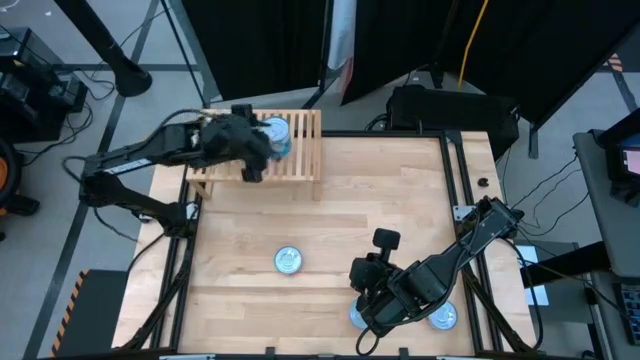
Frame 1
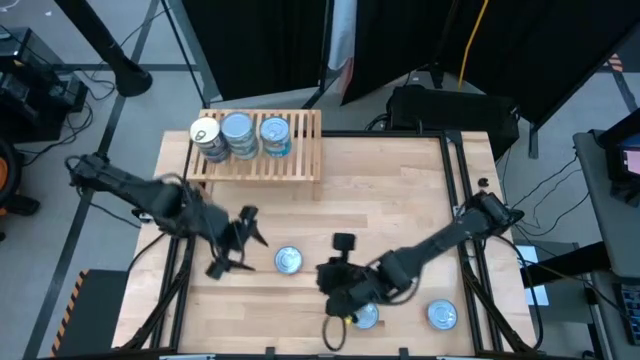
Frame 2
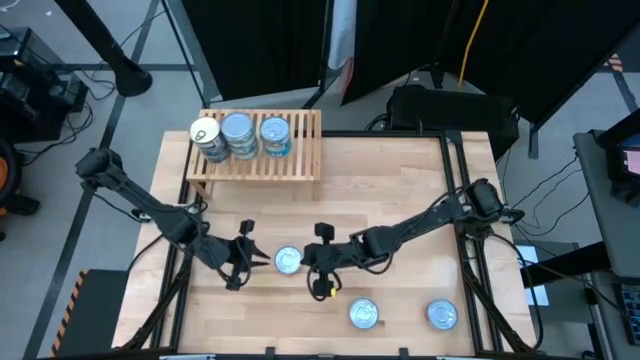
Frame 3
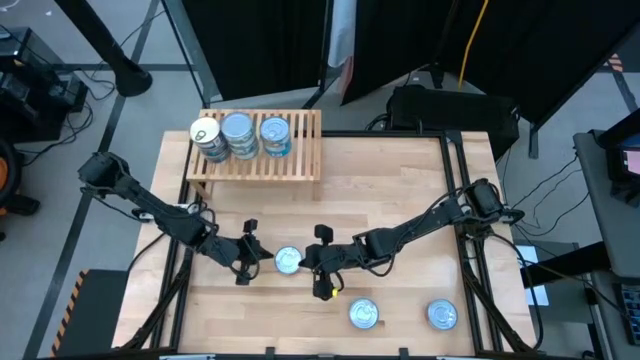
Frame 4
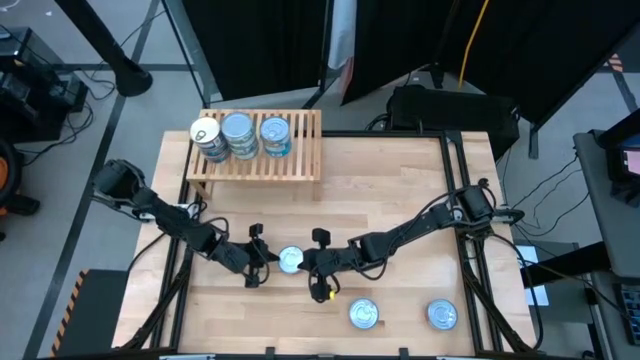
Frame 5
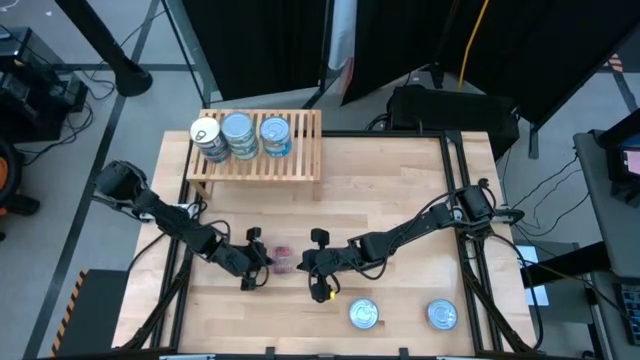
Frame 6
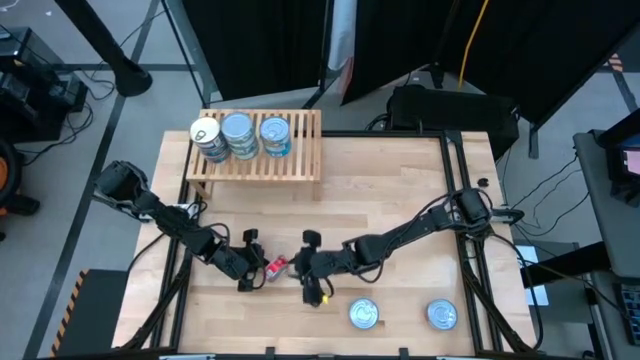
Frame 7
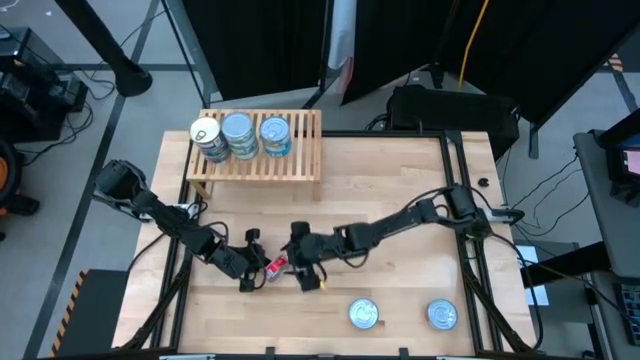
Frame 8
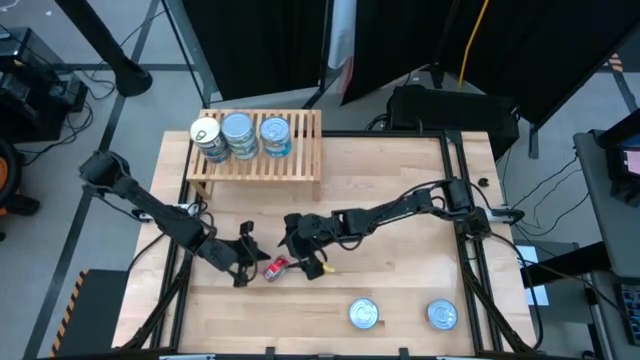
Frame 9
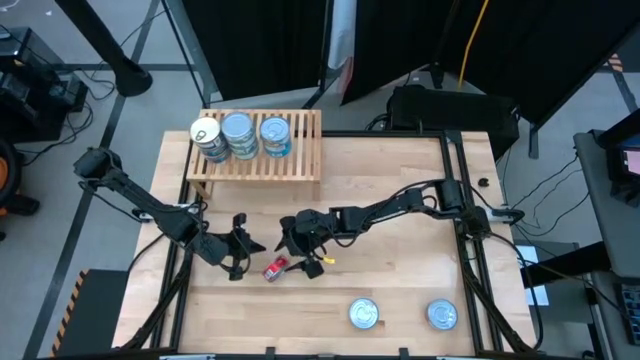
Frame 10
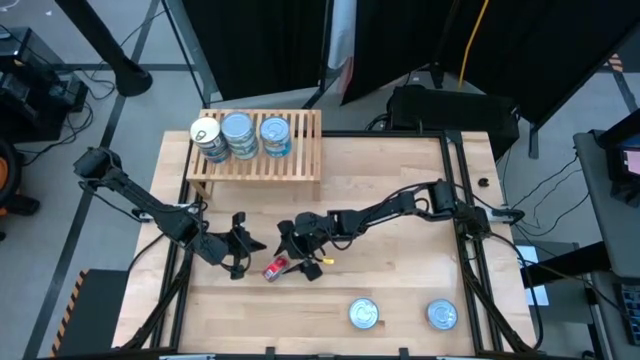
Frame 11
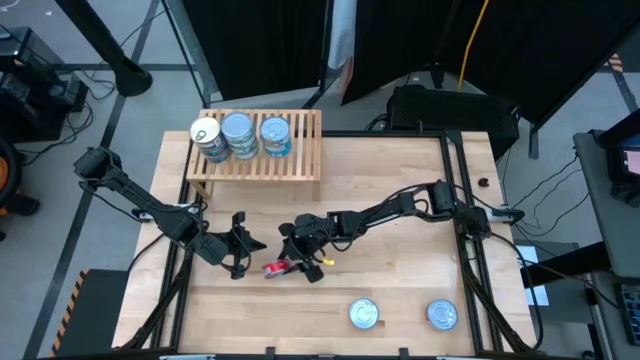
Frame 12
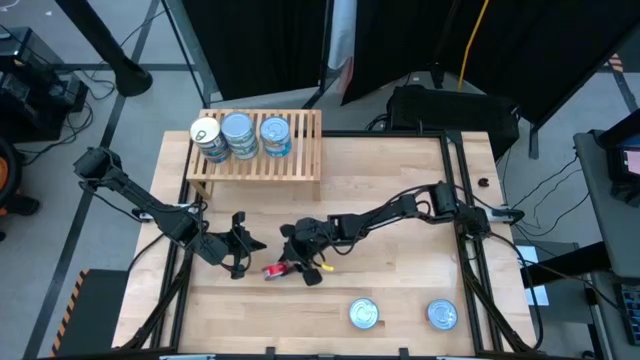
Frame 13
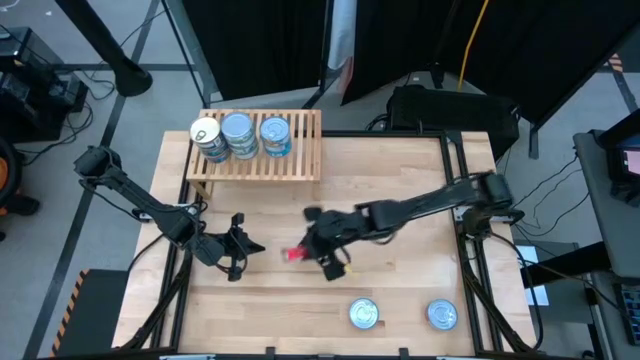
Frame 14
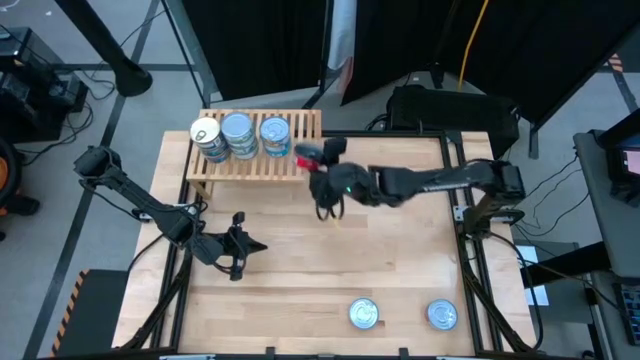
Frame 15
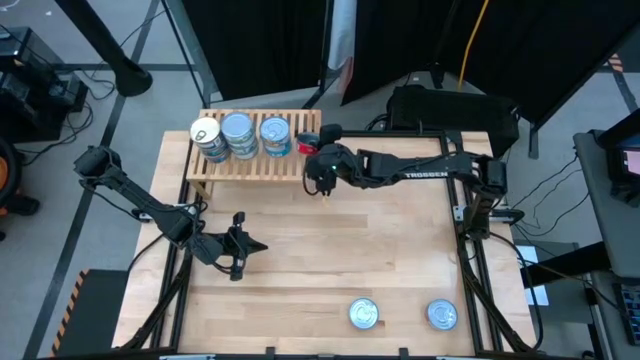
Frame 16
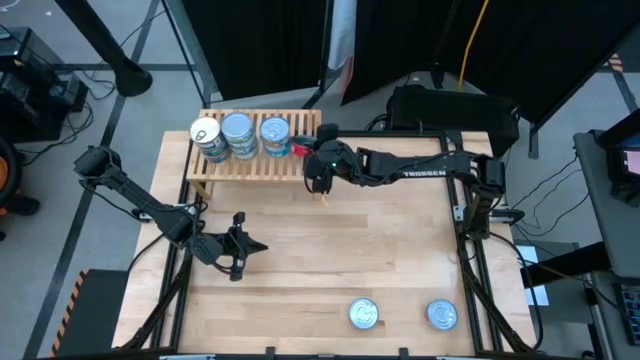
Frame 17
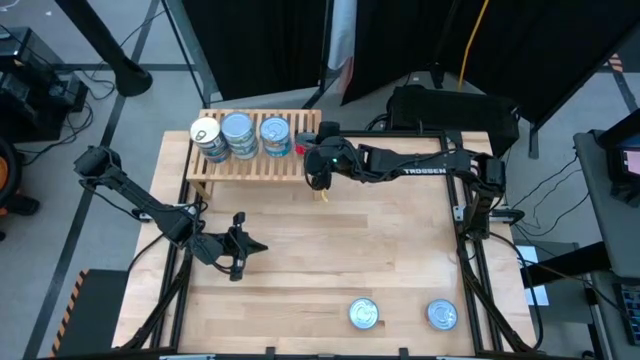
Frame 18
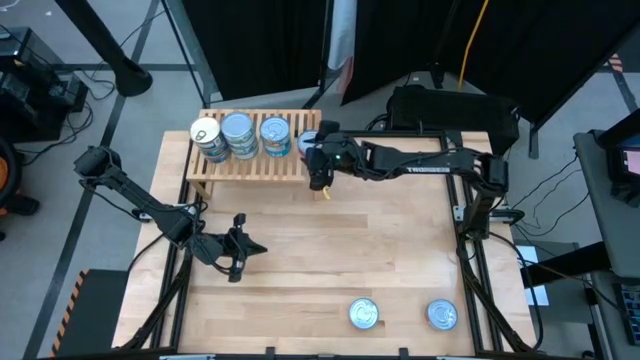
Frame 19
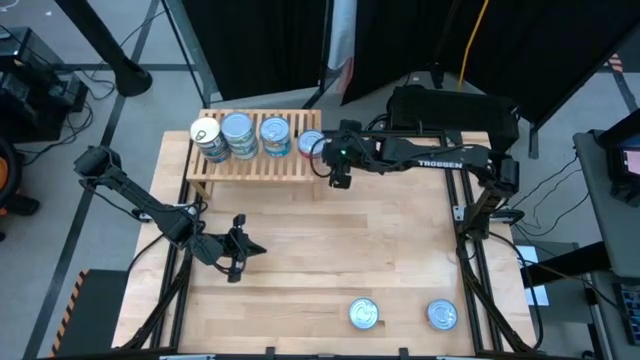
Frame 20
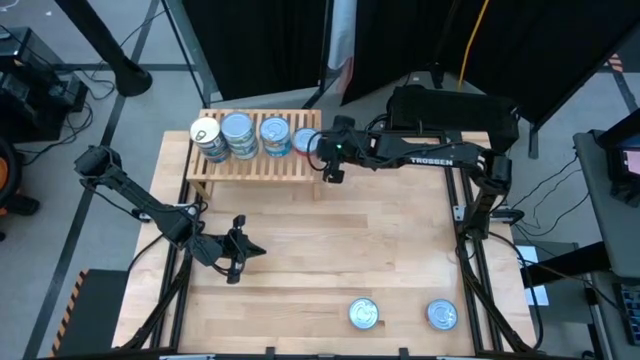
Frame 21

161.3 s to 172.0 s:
Task: Stack canned seafood by type on shelf
Put the top left red can on the shelf

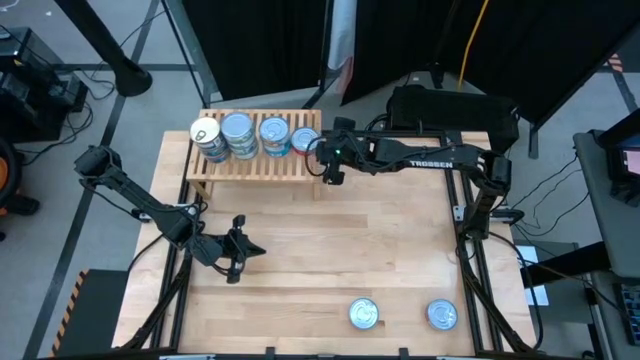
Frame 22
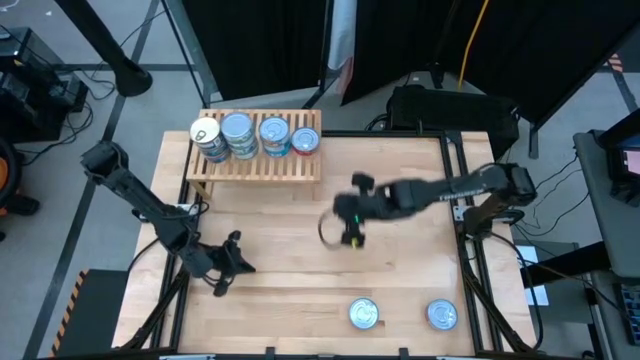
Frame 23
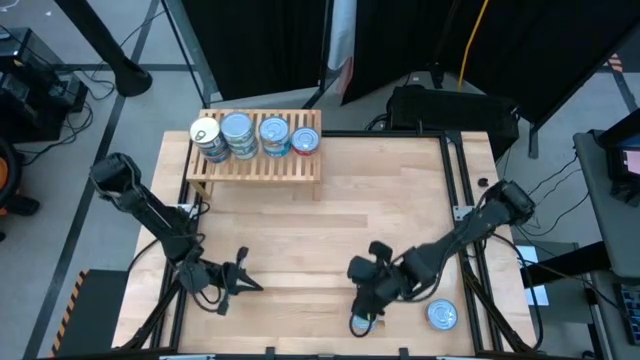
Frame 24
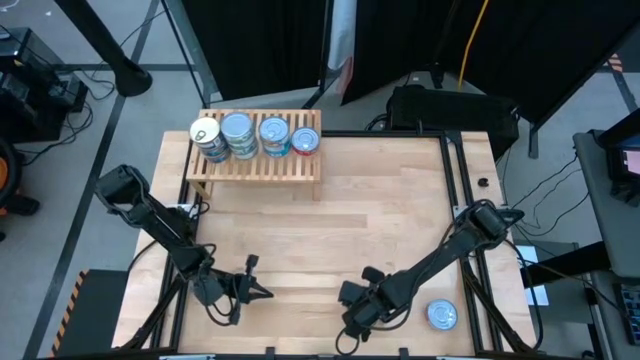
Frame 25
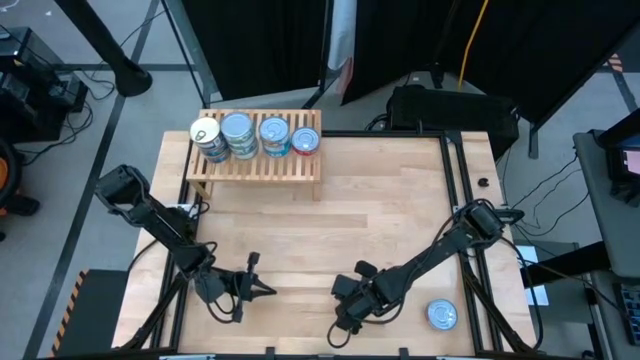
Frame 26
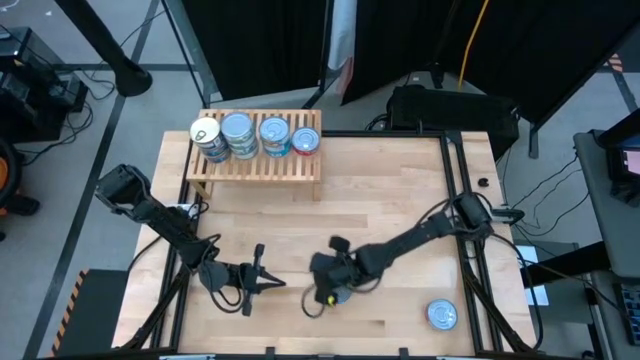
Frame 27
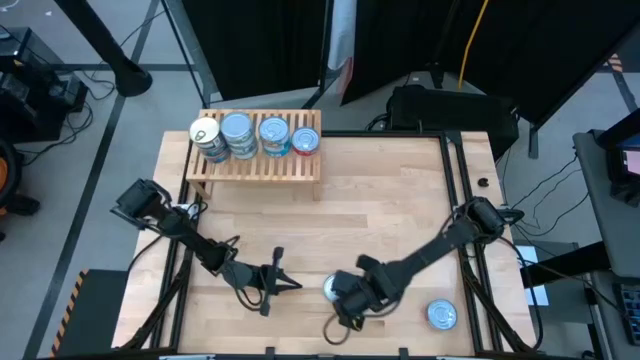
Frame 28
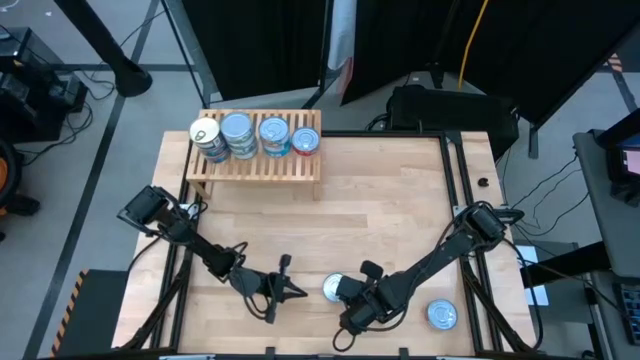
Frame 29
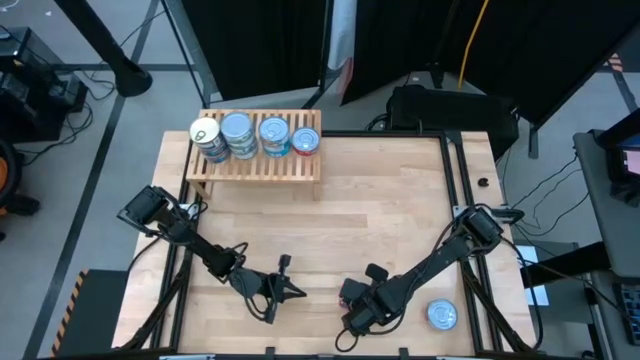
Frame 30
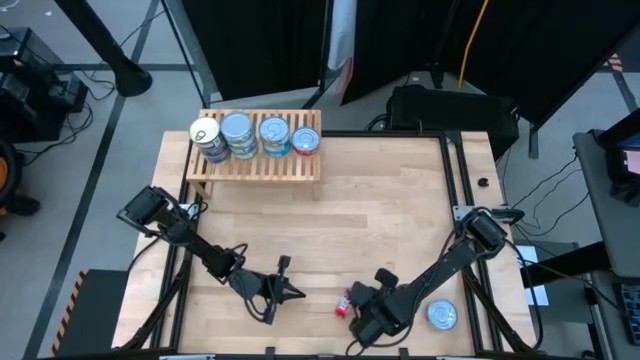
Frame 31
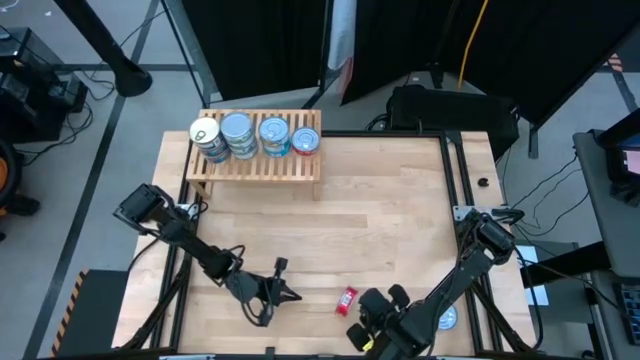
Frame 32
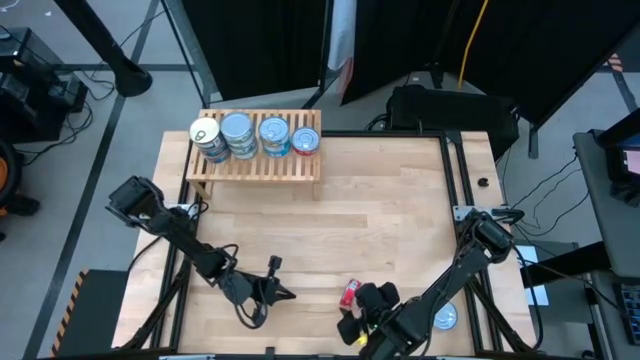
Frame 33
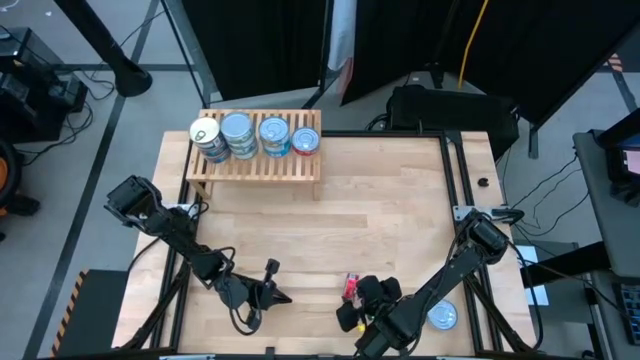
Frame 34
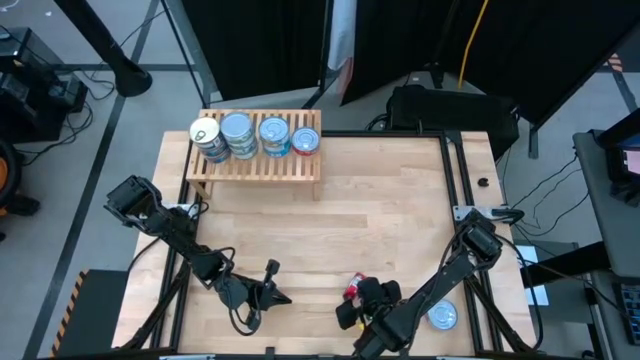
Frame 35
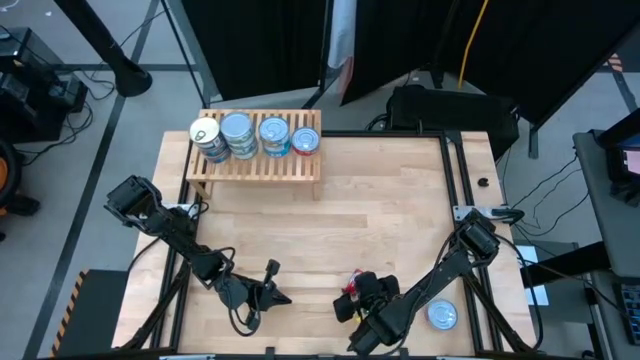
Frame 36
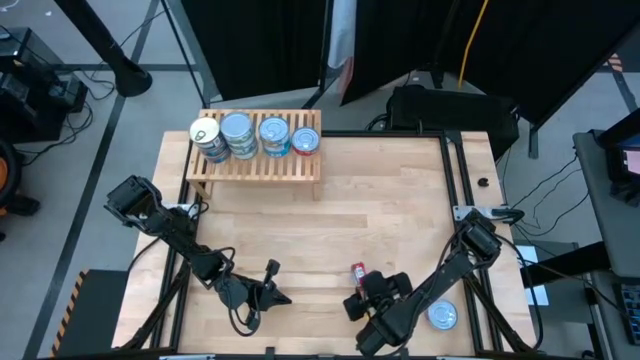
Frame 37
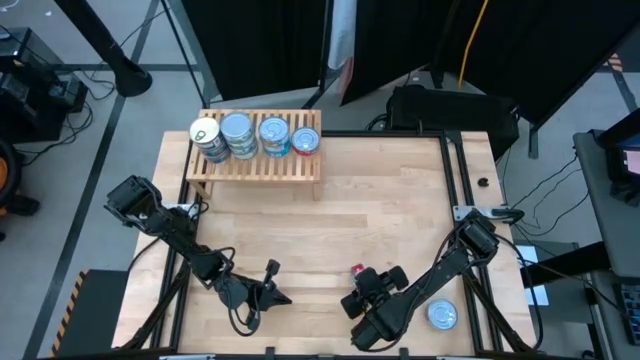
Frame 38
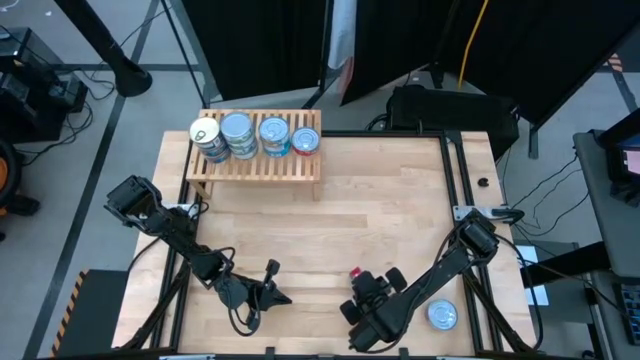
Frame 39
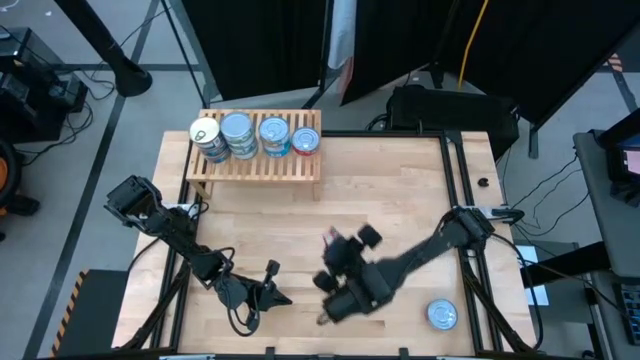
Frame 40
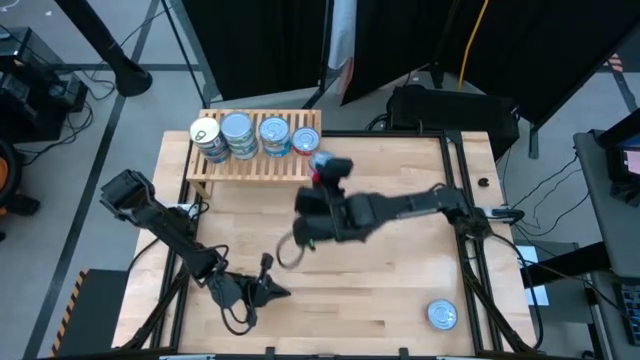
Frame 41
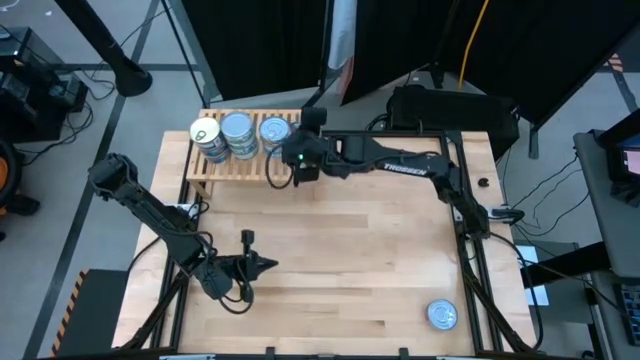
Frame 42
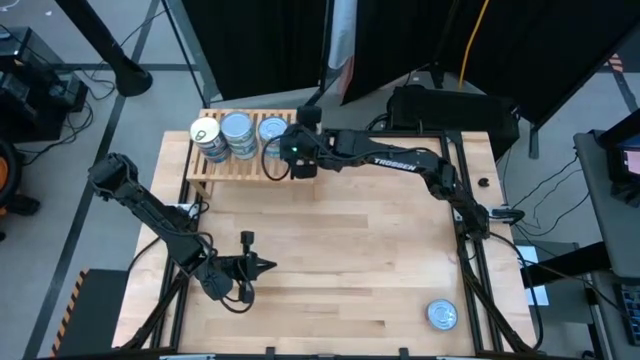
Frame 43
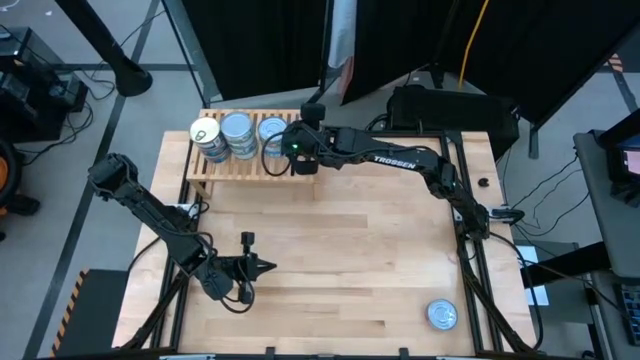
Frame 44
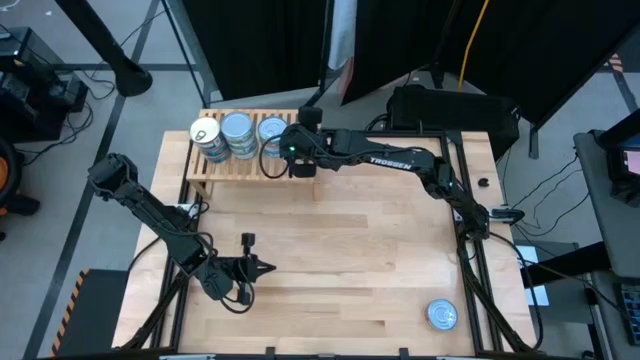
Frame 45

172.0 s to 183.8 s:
Stack the left red can on top of the other red can
